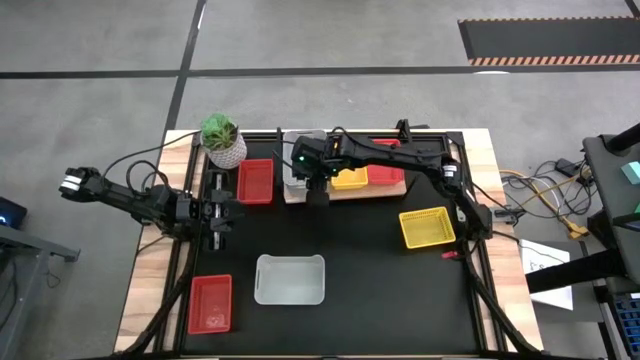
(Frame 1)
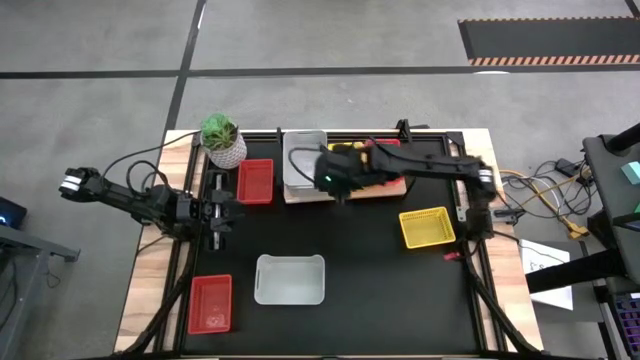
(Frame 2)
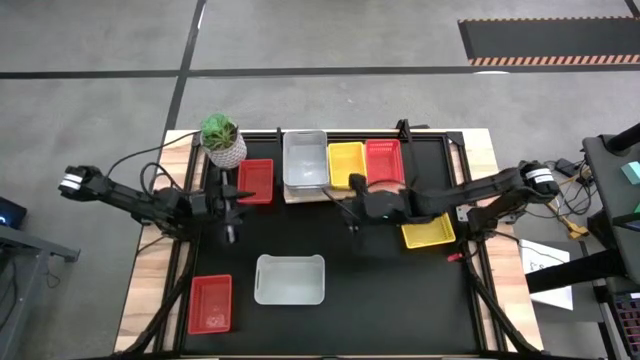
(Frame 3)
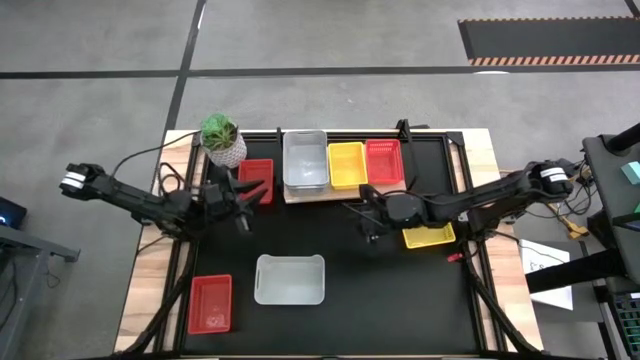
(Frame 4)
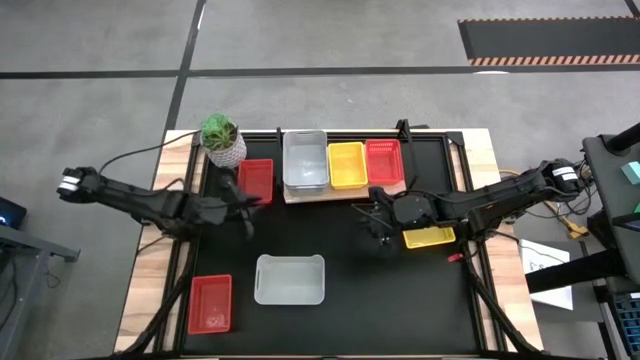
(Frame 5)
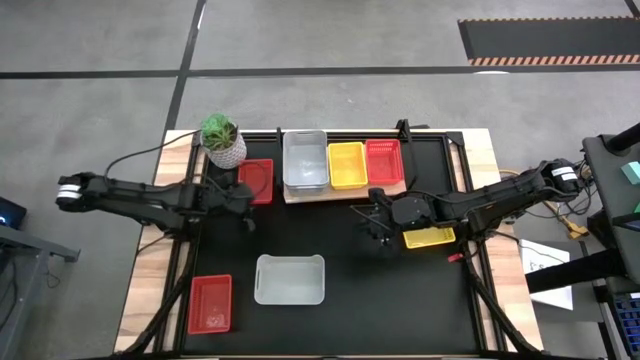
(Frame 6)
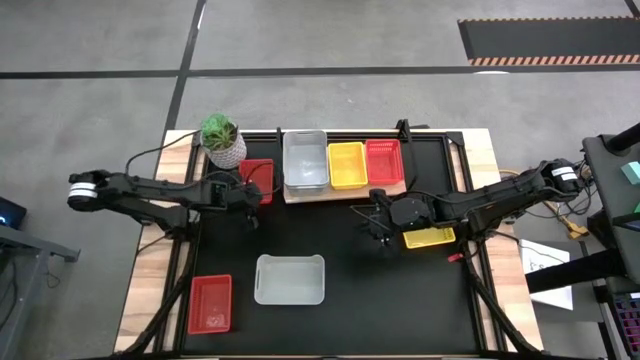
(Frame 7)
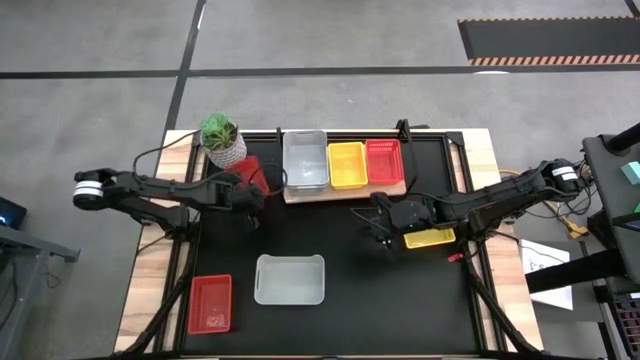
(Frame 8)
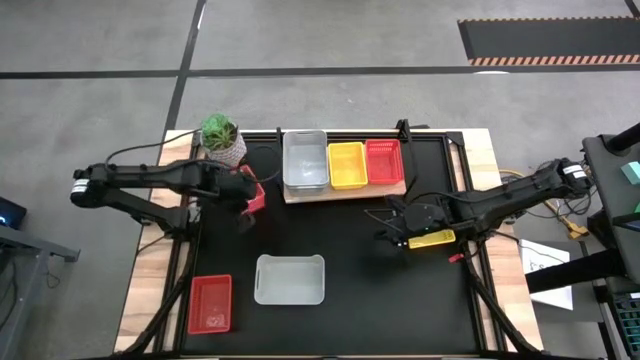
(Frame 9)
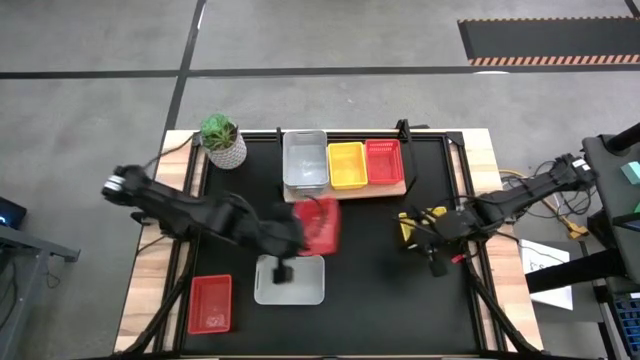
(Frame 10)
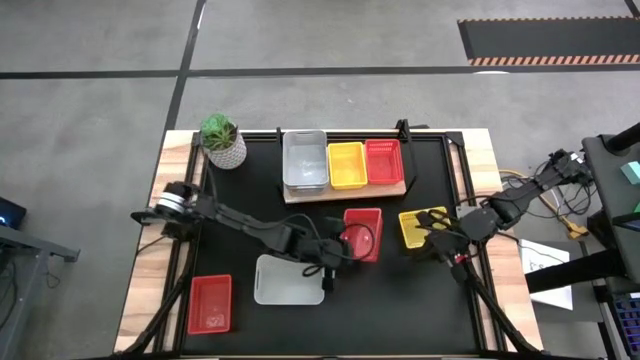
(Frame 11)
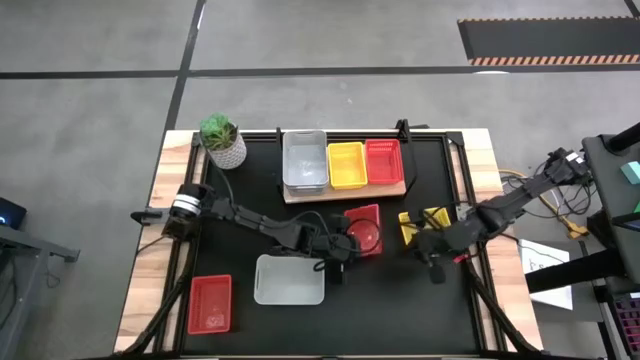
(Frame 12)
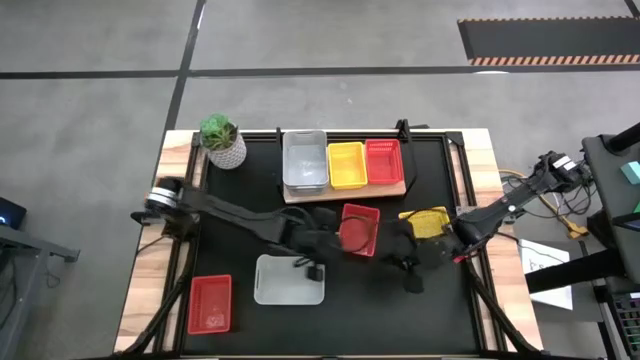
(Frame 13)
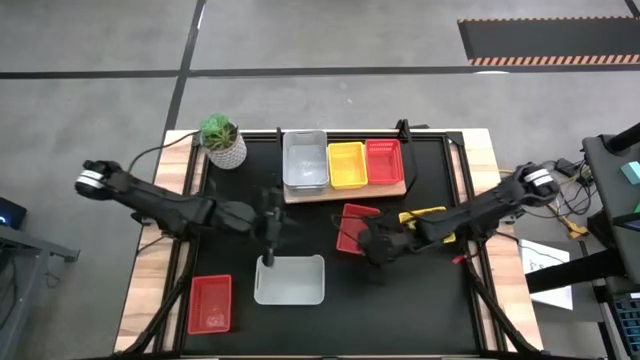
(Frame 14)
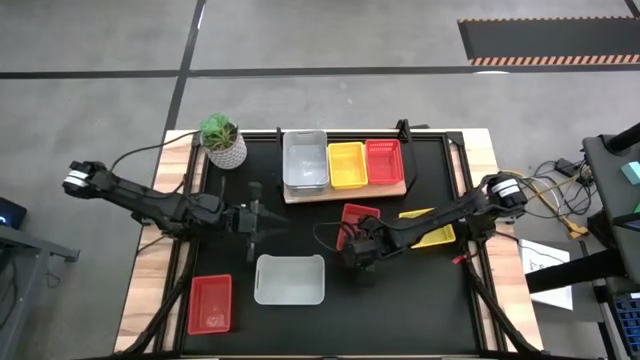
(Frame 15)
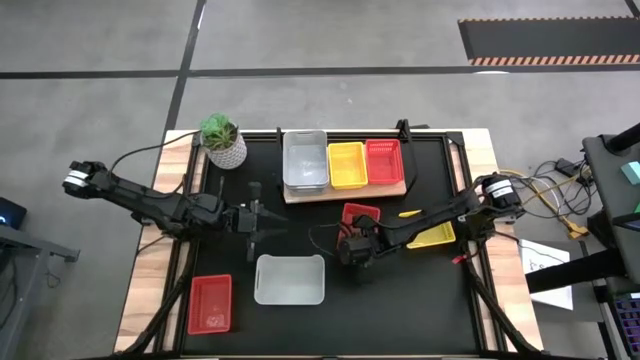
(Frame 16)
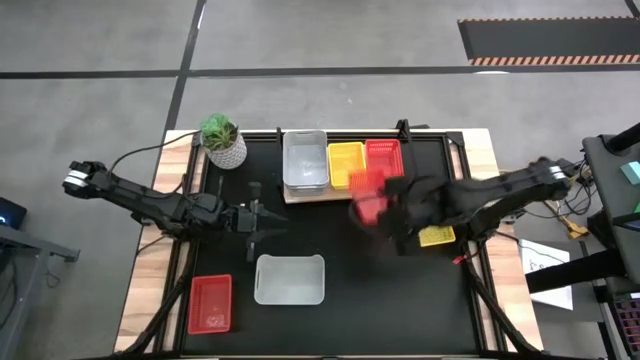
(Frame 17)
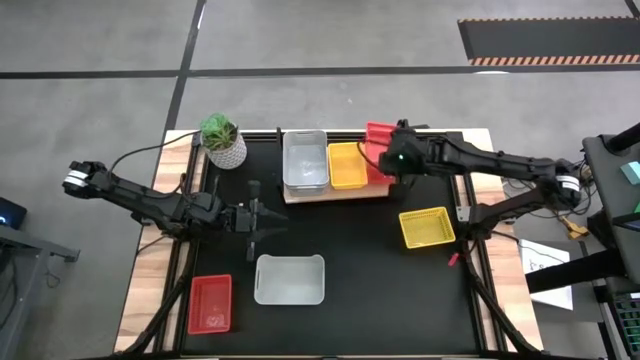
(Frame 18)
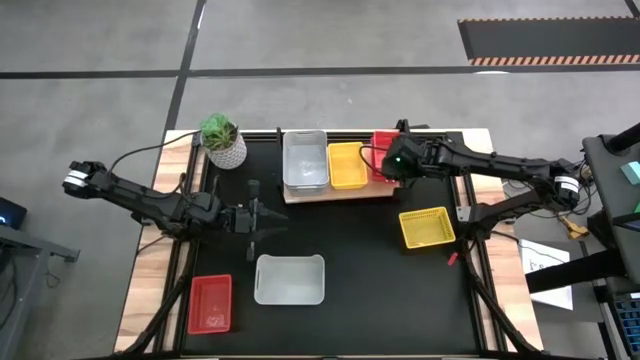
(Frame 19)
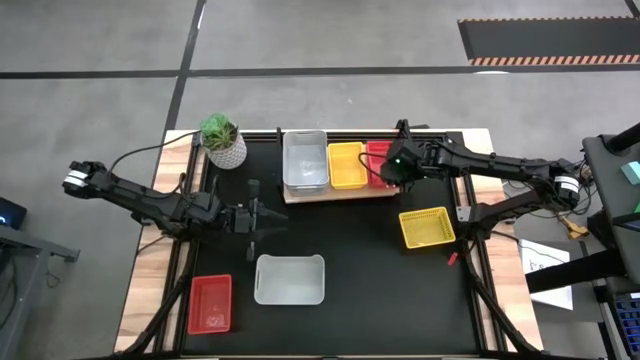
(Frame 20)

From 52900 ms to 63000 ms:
Task: Stack baskets on shelf by color
Stack the top red bin on top of the red bin on the shelf

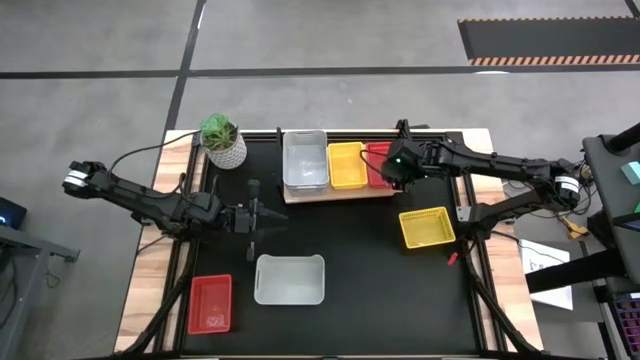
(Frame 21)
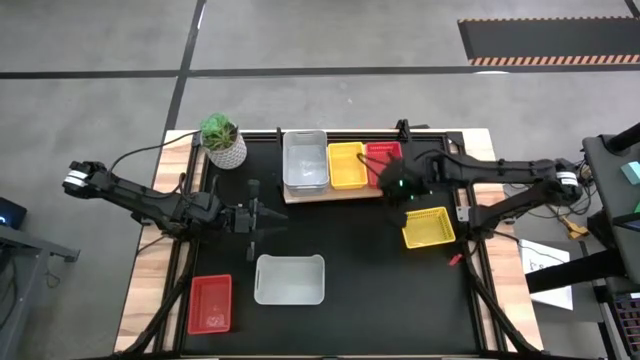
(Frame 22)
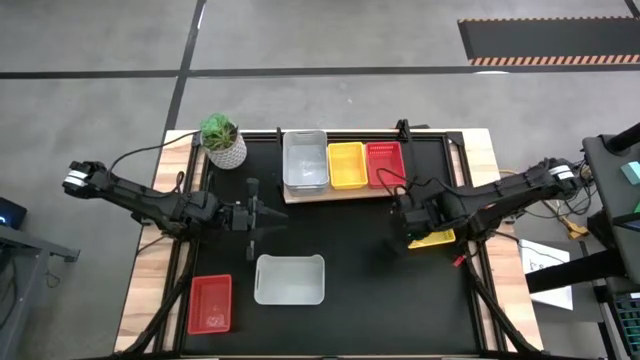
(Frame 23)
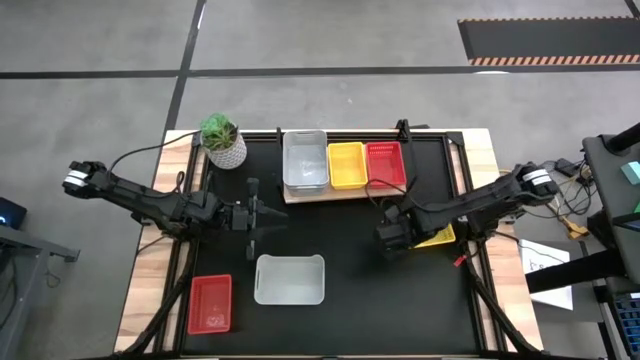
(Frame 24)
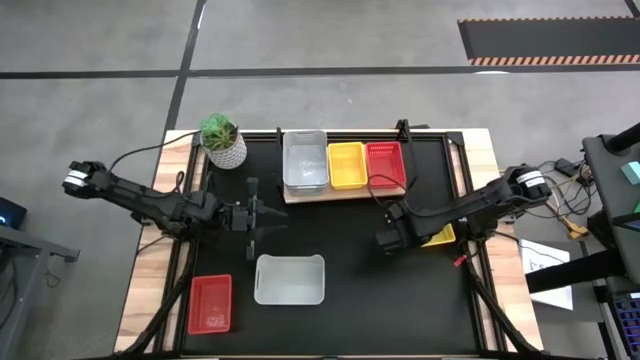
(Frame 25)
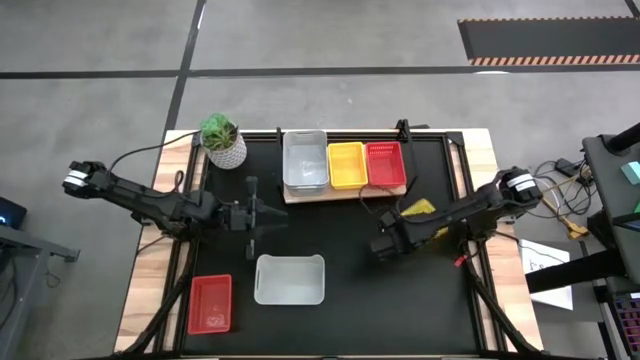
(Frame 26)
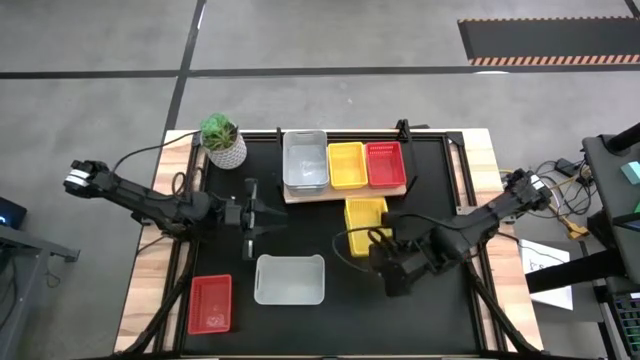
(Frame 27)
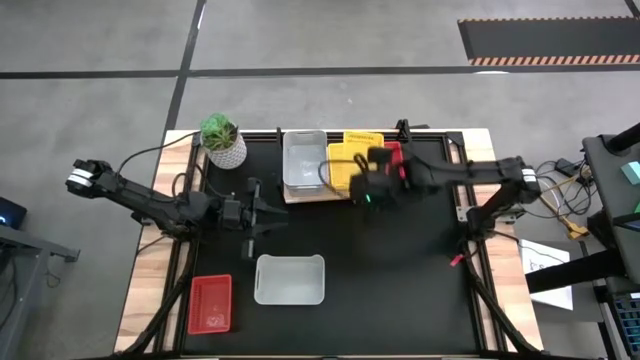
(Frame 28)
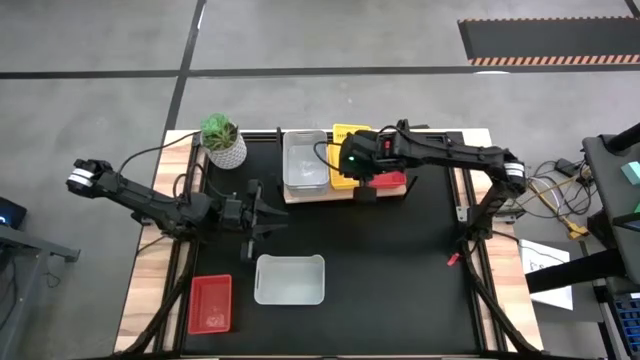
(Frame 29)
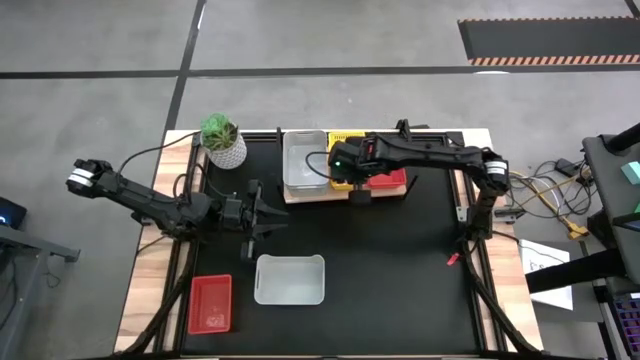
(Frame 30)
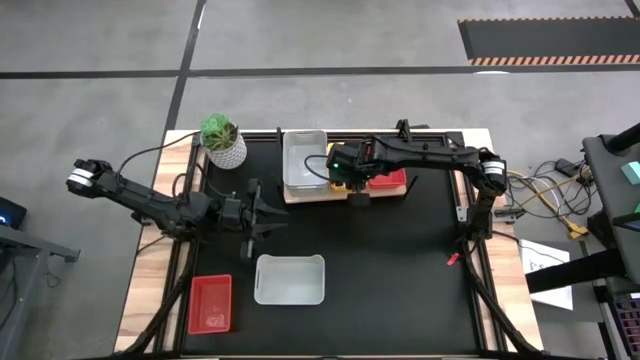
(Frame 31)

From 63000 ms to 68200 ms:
Stack the yellow bin on top of the yellow bin on the shelf

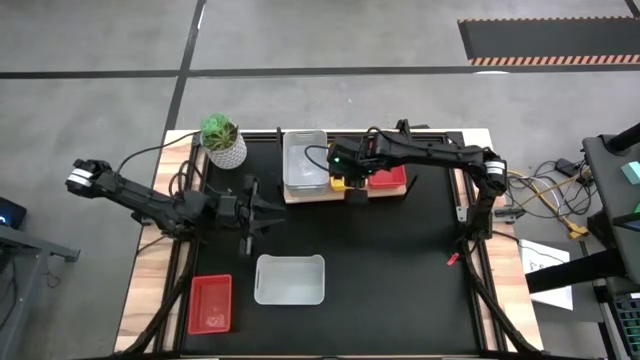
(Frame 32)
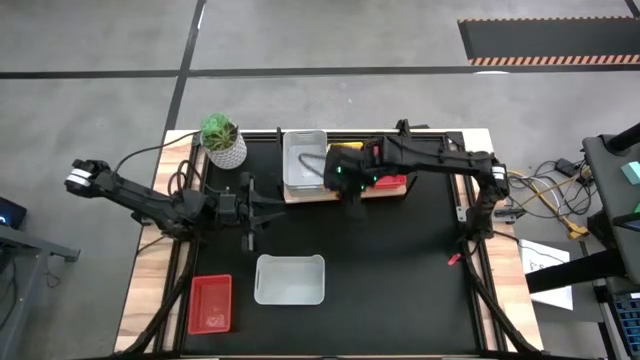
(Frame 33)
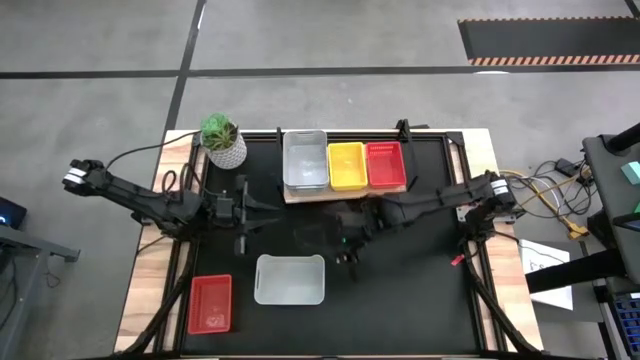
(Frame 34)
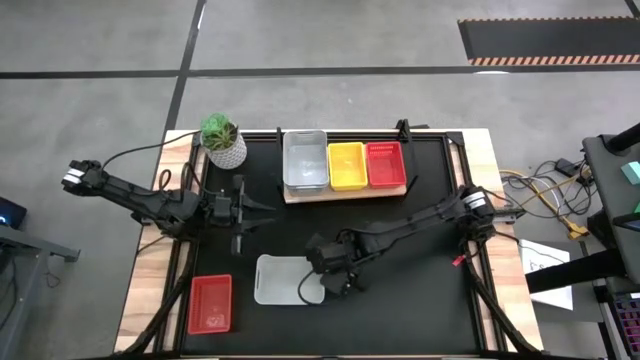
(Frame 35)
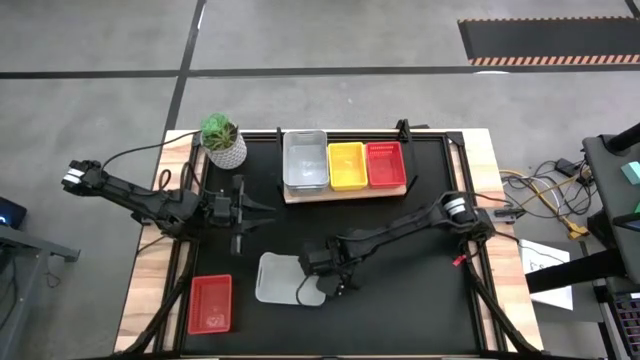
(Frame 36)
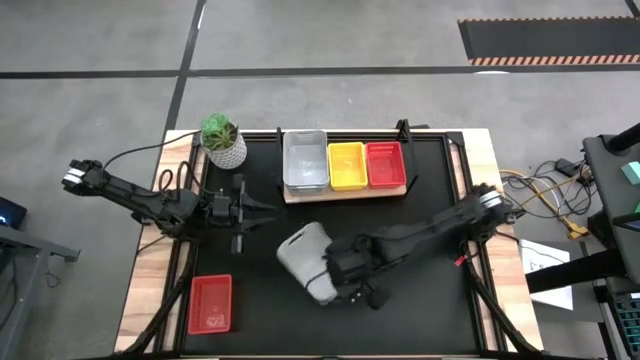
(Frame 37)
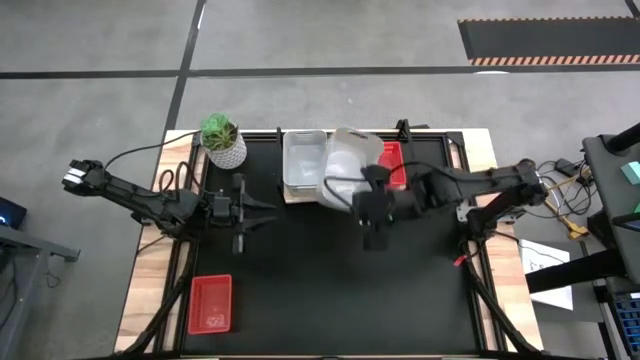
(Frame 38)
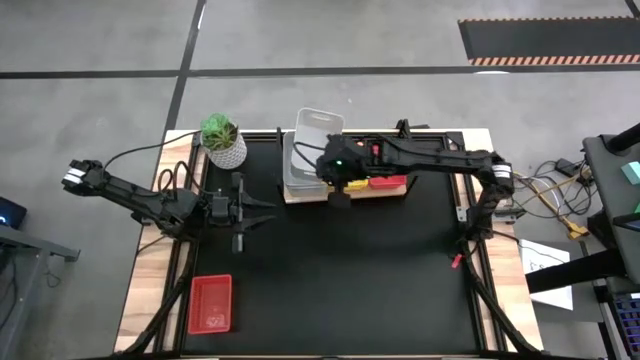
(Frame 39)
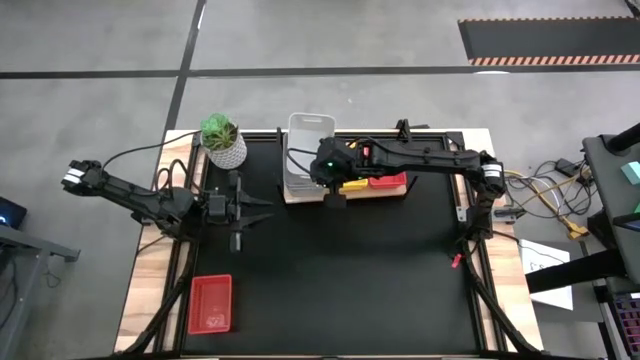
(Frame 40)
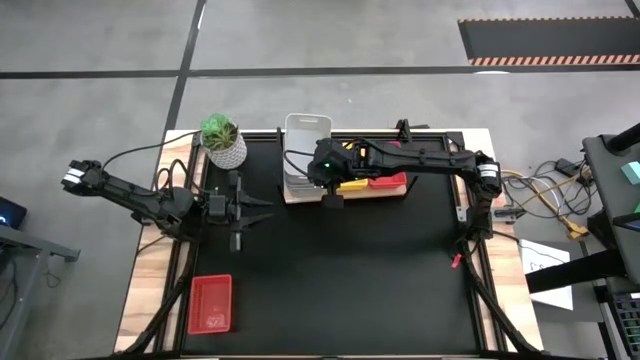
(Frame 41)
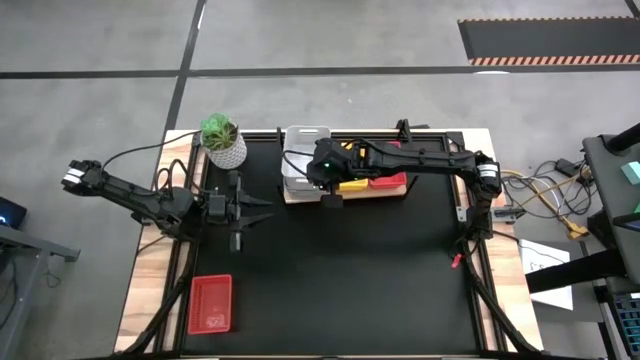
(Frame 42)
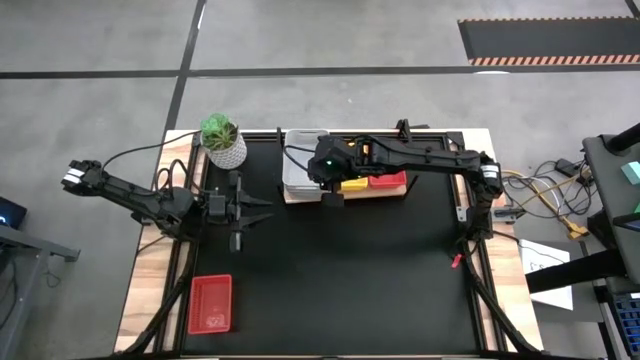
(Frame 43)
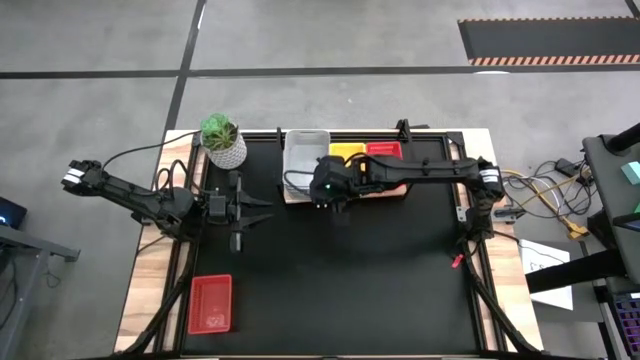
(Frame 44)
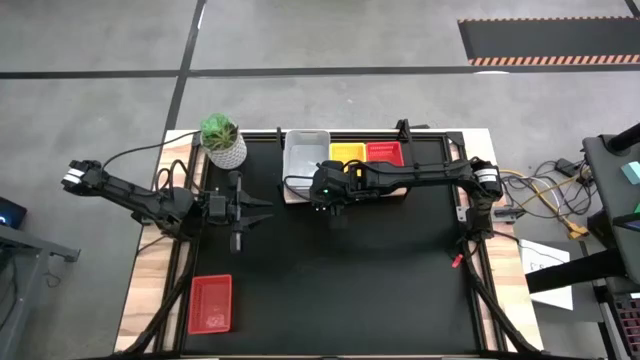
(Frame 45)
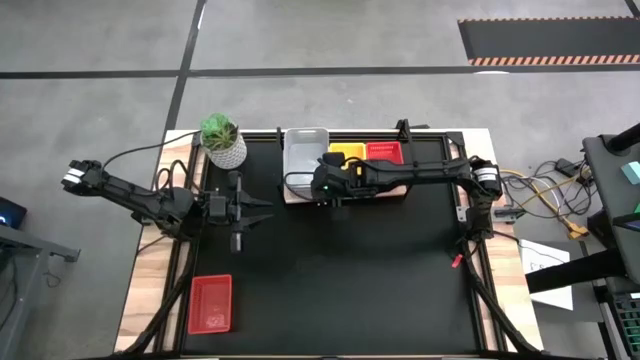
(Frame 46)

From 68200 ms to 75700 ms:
Stack the gray bin on top of the gray bin on the shelf
